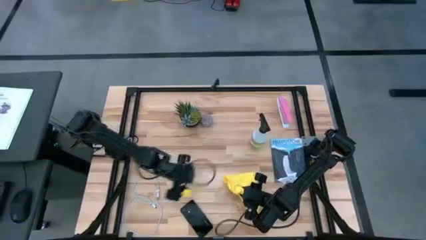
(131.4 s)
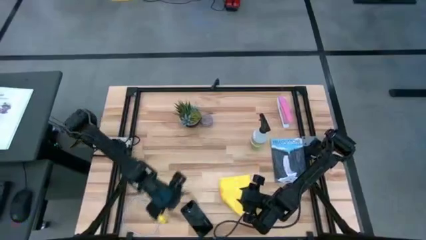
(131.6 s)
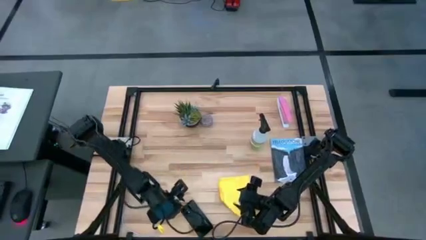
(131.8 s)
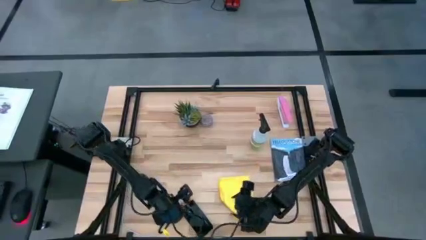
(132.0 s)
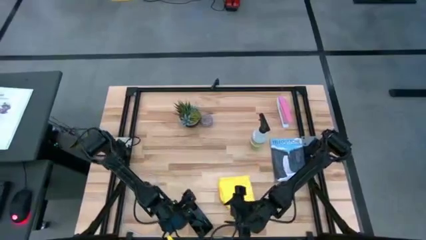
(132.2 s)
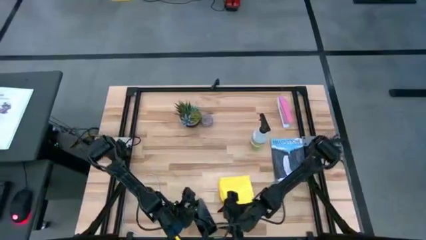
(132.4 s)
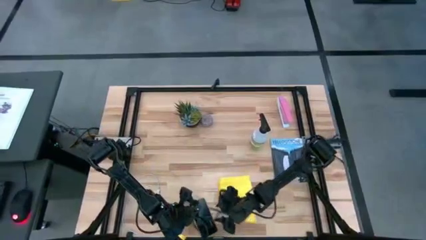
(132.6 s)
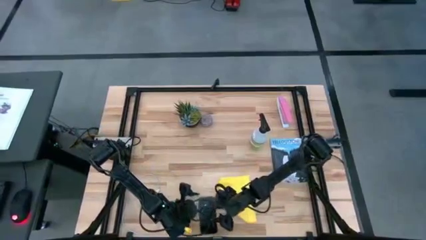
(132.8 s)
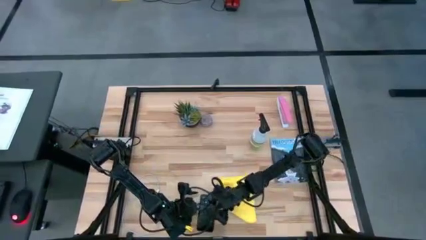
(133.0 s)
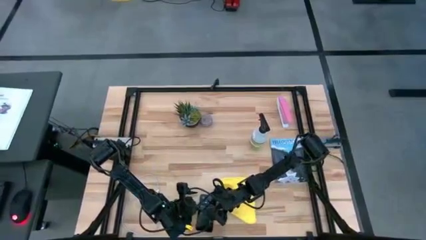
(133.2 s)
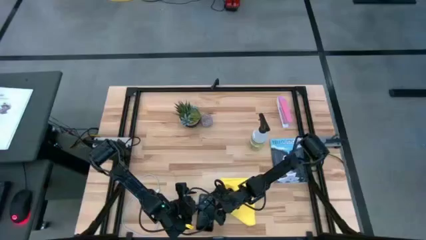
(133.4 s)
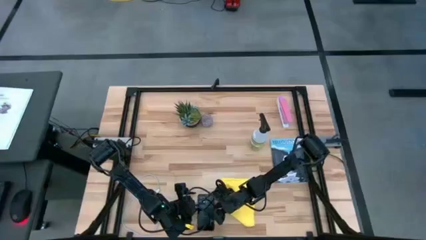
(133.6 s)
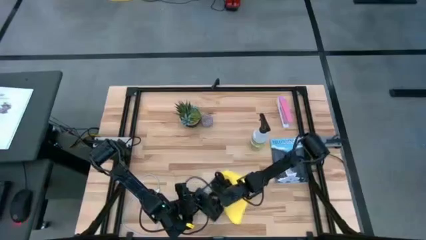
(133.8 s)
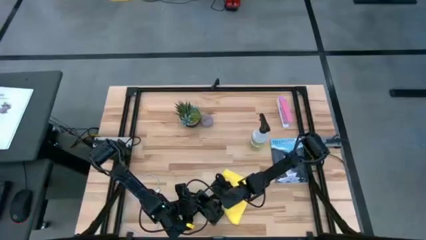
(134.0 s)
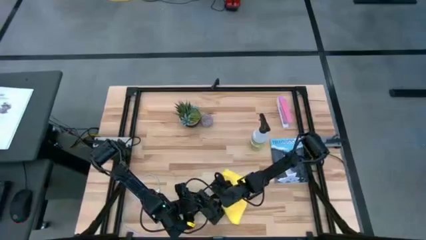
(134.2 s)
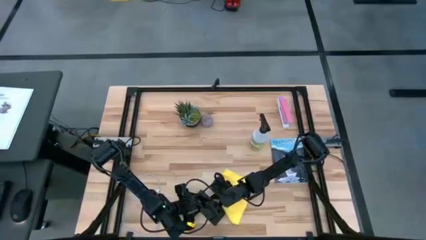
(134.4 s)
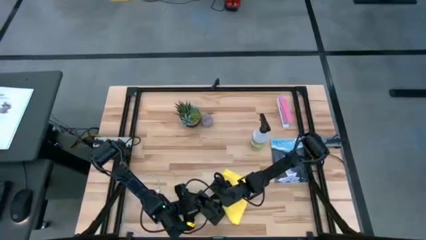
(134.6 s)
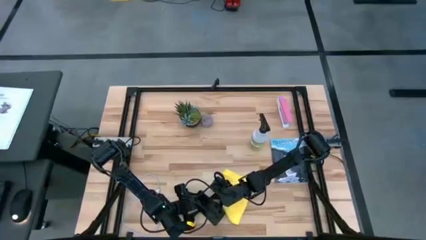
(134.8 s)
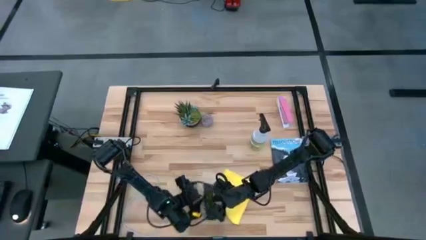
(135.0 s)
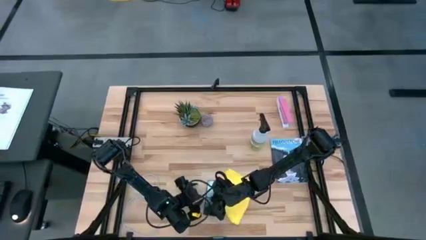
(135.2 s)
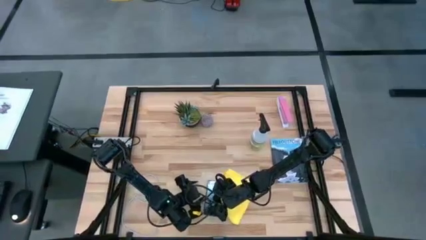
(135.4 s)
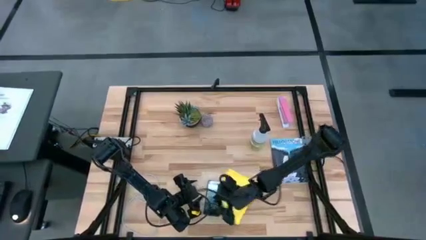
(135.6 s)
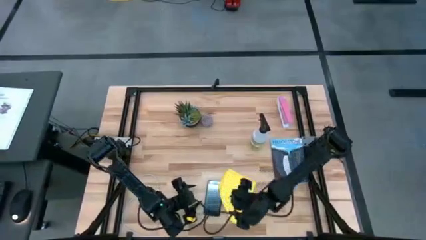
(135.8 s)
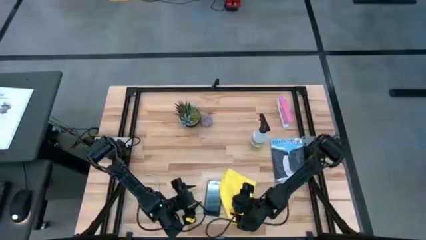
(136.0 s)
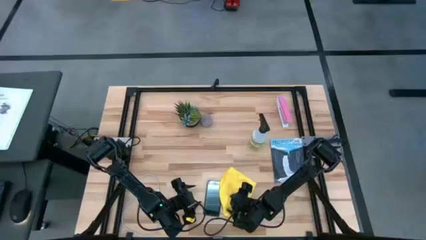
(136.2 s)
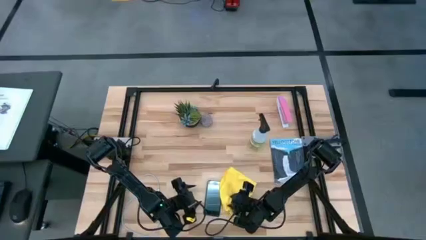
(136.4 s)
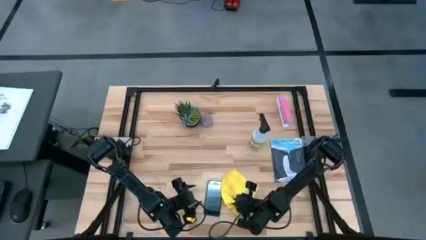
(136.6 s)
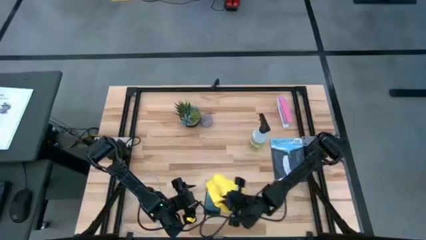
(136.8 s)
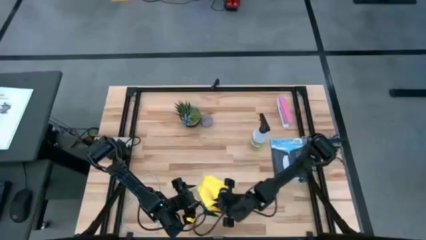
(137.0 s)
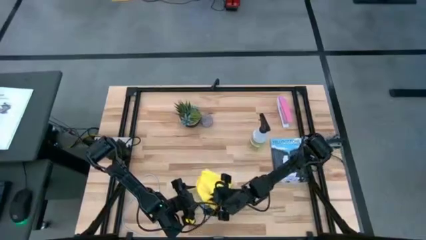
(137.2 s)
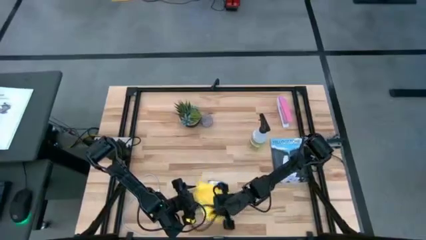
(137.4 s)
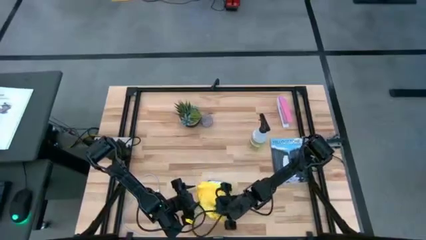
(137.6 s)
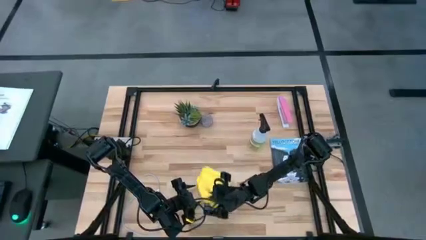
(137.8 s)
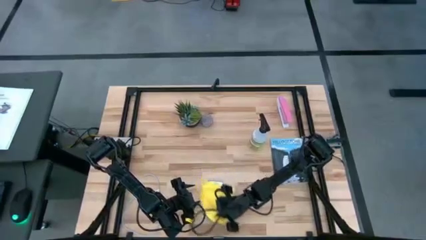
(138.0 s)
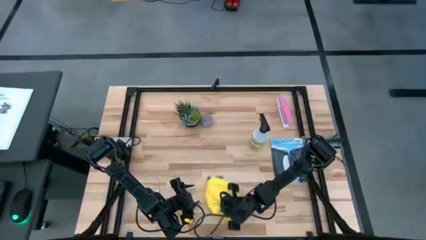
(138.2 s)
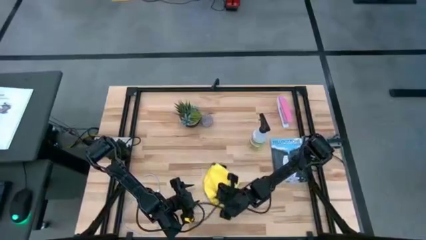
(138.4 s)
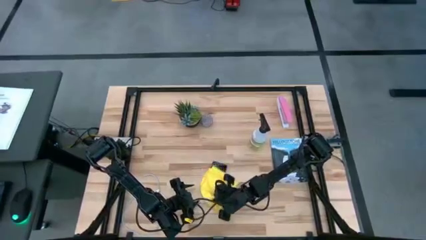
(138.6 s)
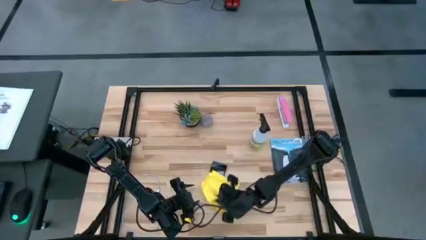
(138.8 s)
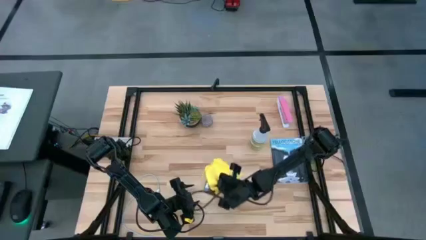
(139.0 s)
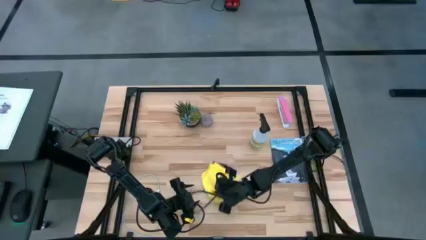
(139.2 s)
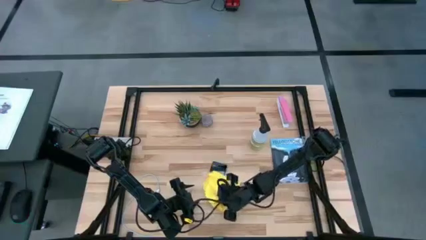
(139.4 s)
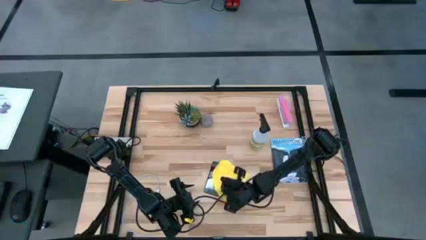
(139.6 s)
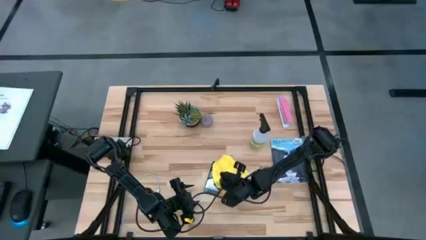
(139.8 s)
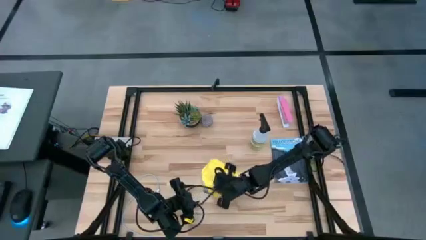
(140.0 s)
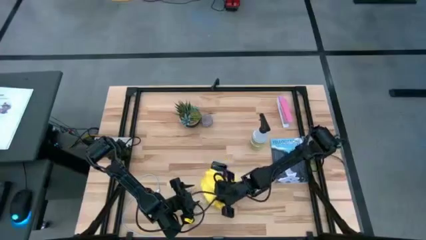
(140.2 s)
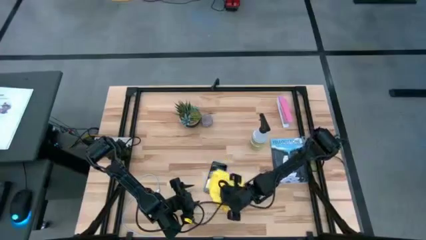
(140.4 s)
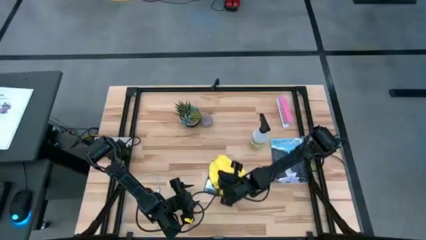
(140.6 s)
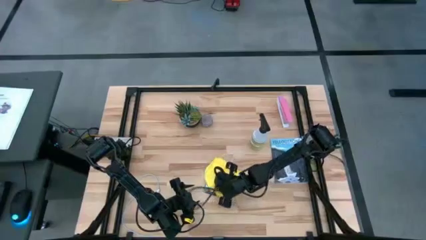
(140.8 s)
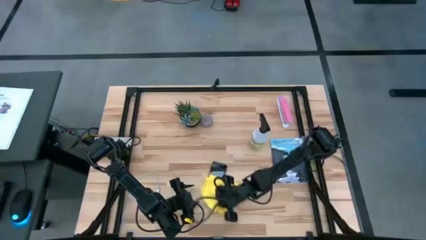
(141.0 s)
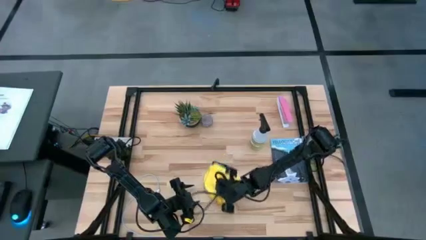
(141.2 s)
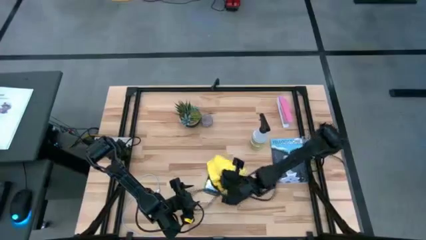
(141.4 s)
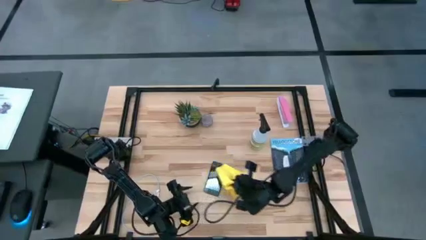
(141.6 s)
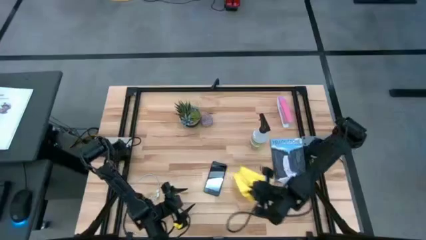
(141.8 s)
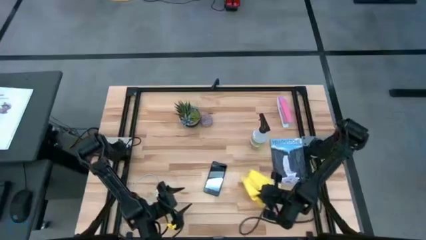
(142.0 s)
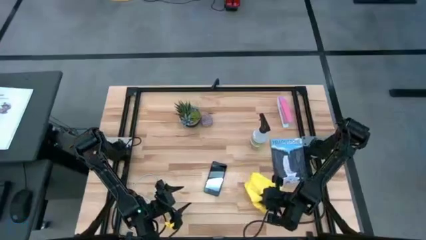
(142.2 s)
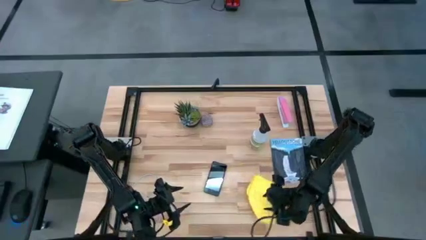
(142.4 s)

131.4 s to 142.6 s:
Task: Apply microfiber cloth
Wipe the front side of the cellphone using the yellow microfiber cloth

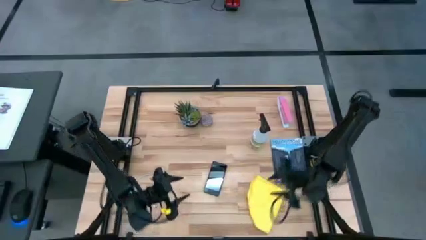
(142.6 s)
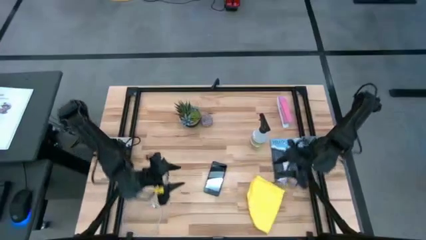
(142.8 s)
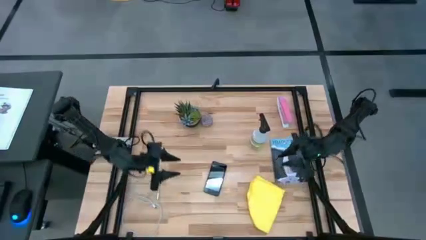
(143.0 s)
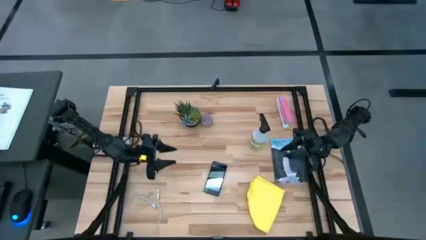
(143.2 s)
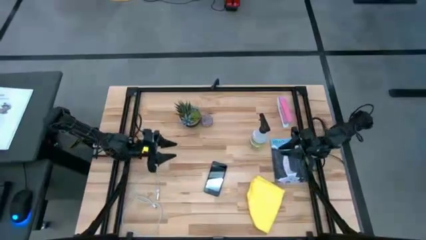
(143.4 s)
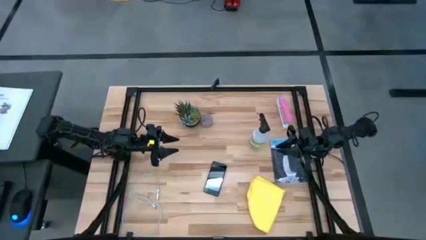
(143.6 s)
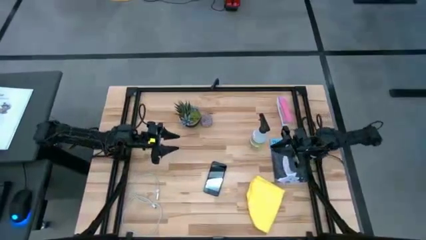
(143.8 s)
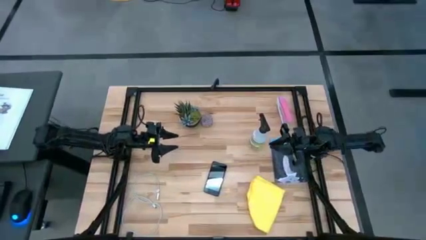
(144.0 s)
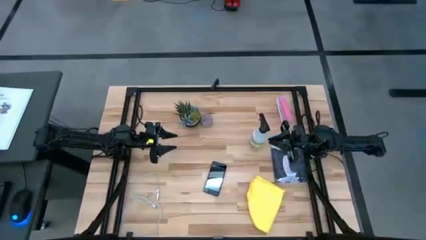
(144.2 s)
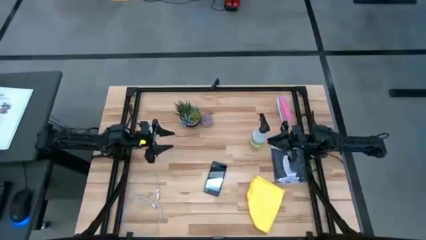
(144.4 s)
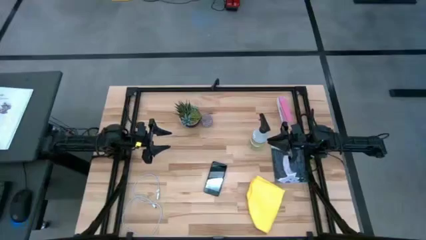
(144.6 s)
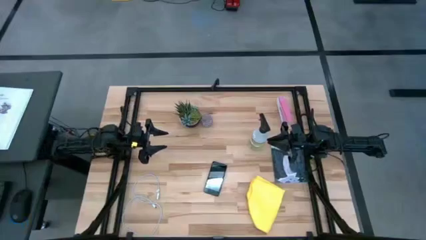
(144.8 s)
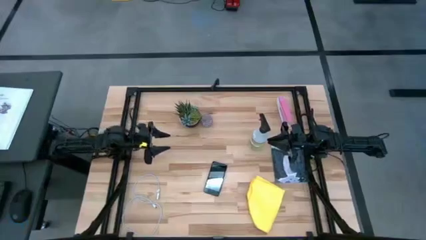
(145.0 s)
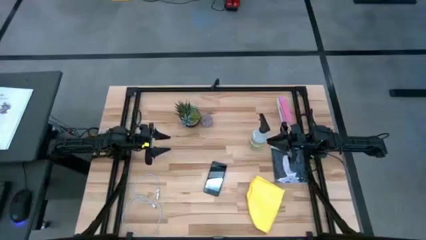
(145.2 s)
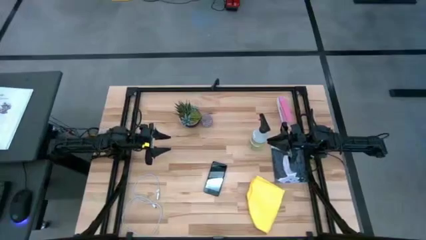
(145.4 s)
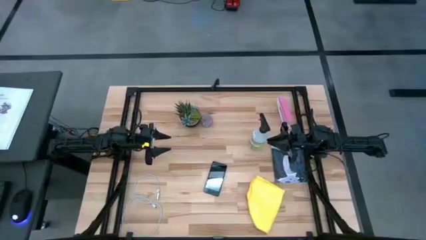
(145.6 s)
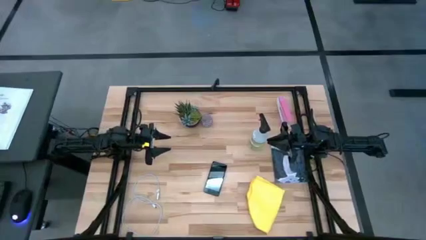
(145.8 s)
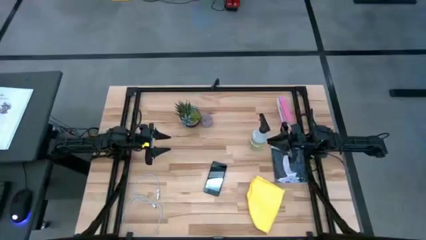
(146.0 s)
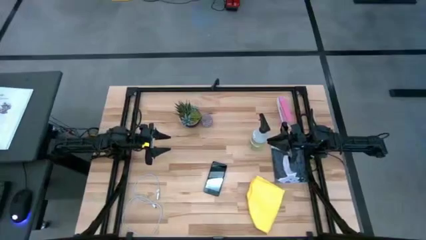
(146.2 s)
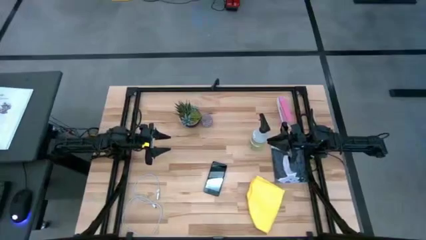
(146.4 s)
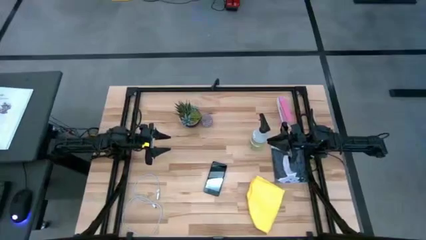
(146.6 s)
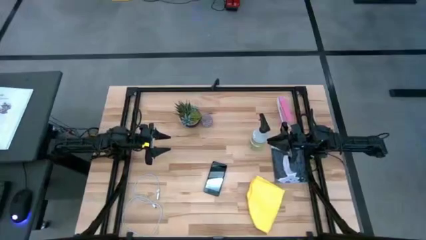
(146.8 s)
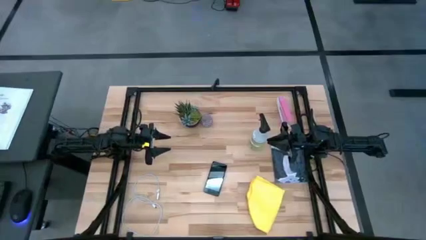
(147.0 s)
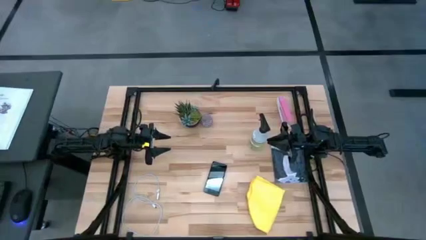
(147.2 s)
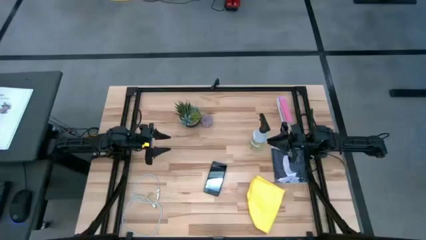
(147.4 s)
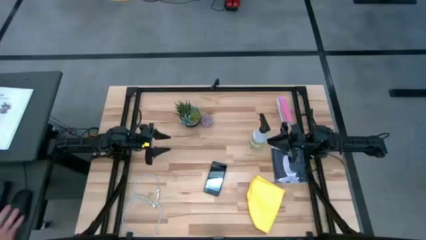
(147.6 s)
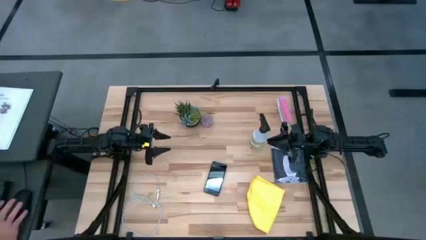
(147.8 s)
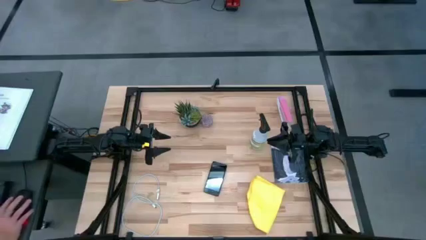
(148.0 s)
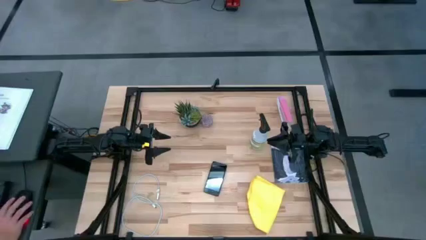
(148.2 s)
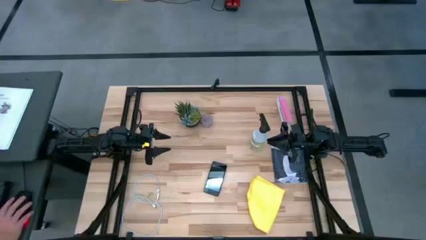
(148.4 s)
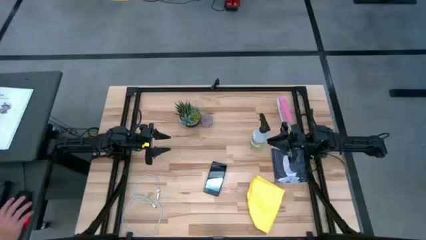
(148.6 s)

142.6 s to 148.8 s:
Return to Home Position
